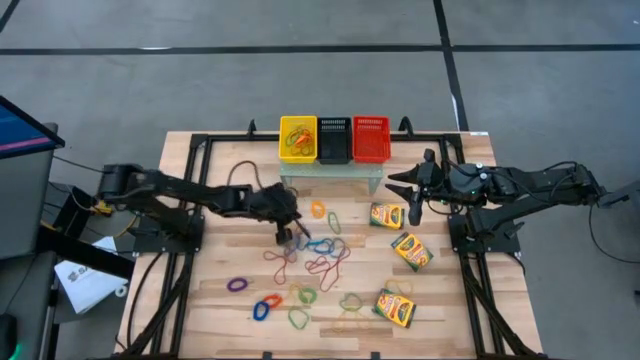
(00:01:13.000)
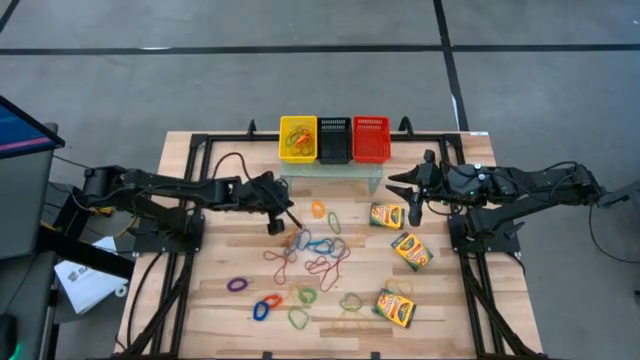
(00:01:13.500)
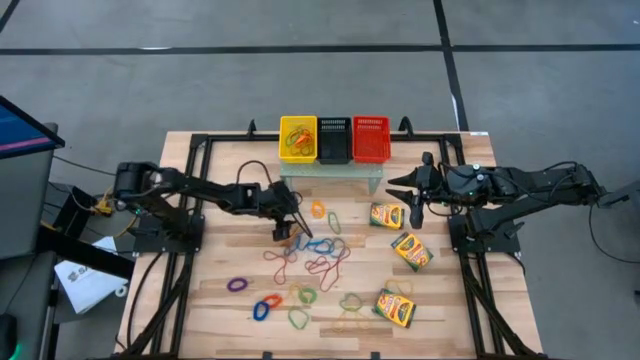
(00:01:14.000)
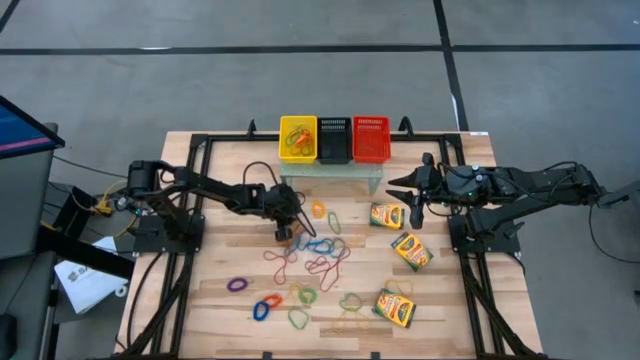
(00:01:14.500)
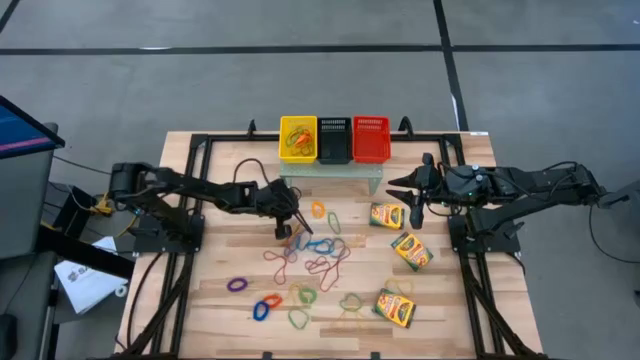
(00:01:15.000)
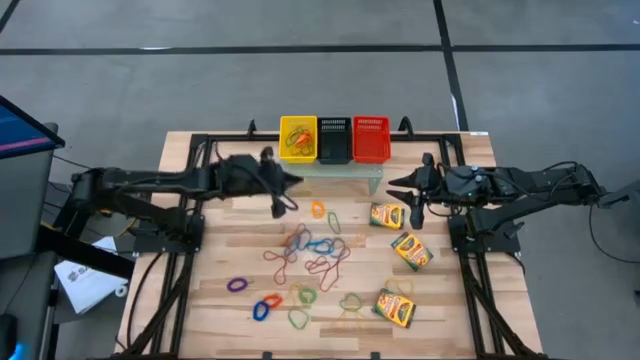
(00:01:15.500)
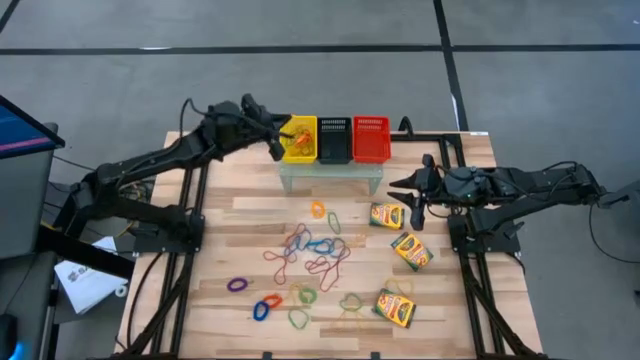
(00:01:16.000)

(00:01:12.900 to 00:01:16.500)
Task: Pick & Place Office Desk Supplies
Put the big yellow rubber band into the yellow bin on the shelf

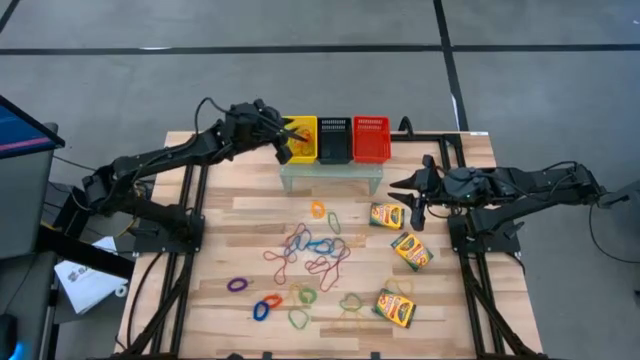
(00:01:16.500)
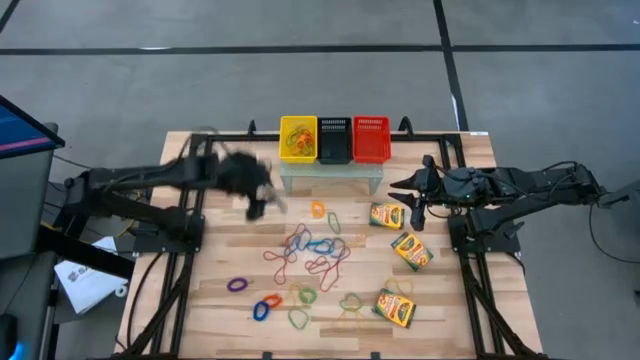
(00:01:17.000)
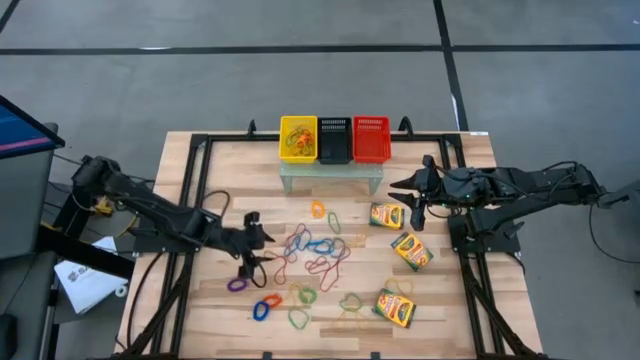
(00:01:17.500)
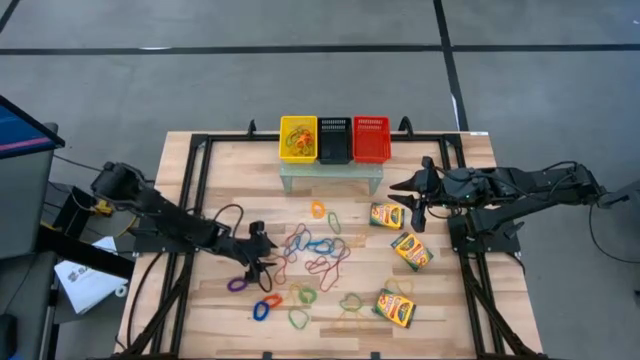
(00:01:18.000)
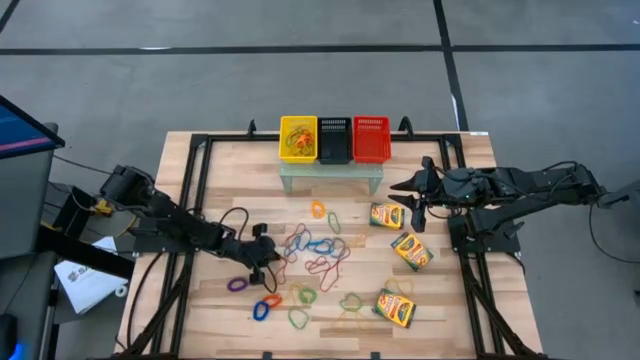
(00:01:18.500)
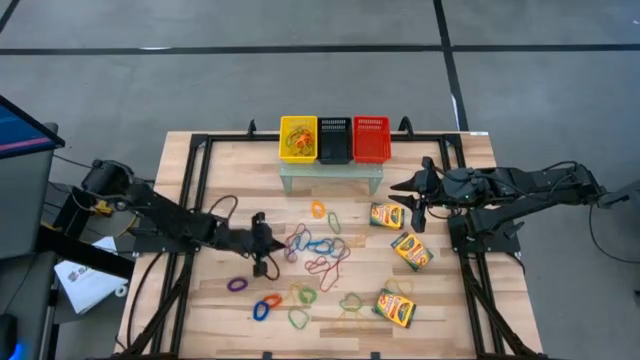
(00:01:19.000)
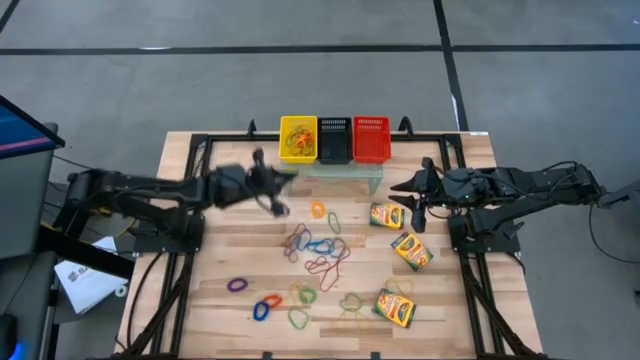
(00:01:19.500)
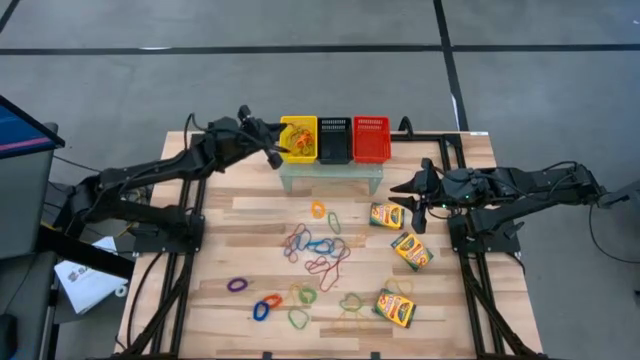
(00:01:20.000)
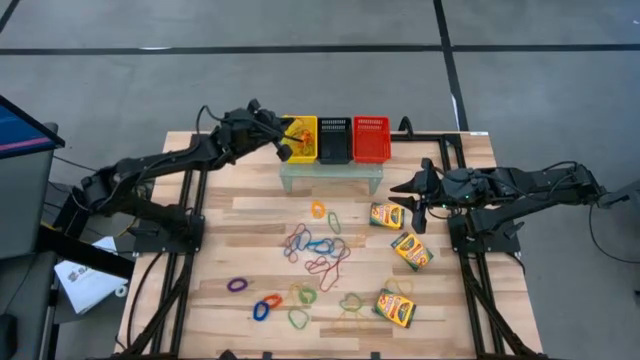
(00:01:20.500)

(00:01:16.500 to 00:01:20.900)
Put the big red rubber band into the yellow bin on the shelf

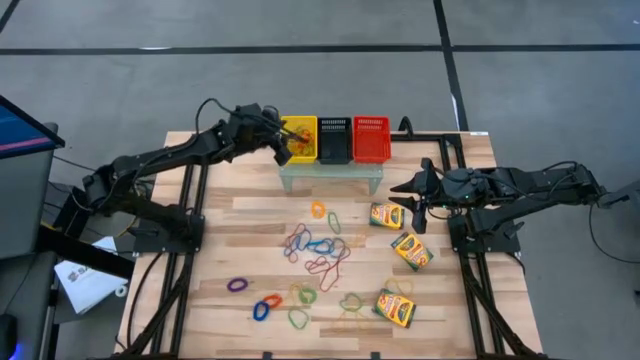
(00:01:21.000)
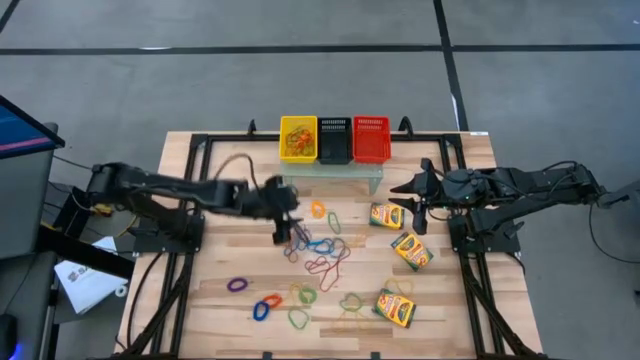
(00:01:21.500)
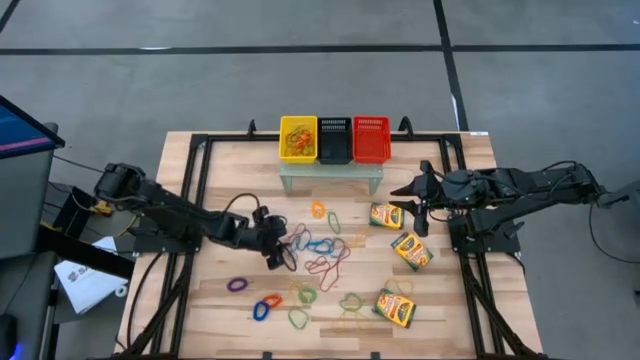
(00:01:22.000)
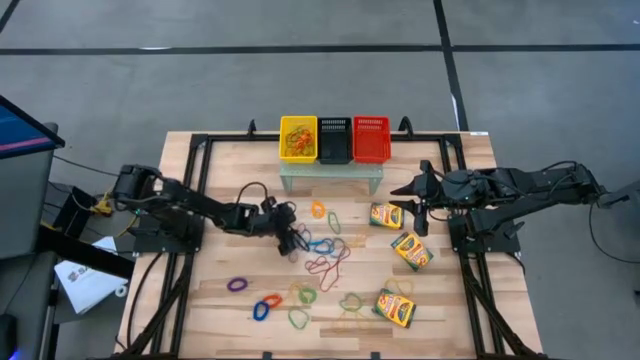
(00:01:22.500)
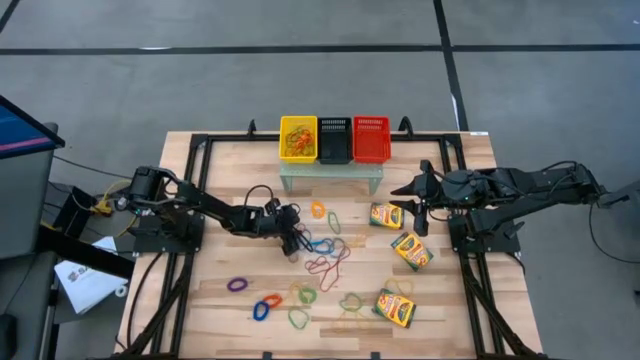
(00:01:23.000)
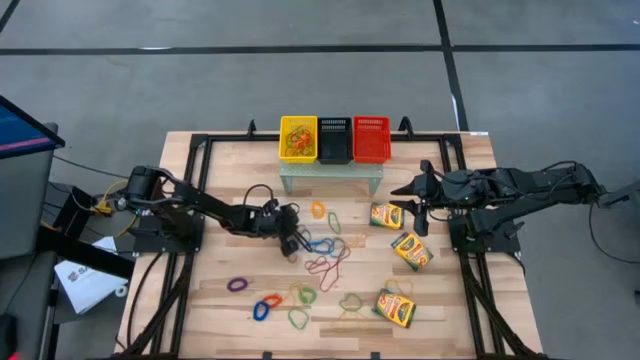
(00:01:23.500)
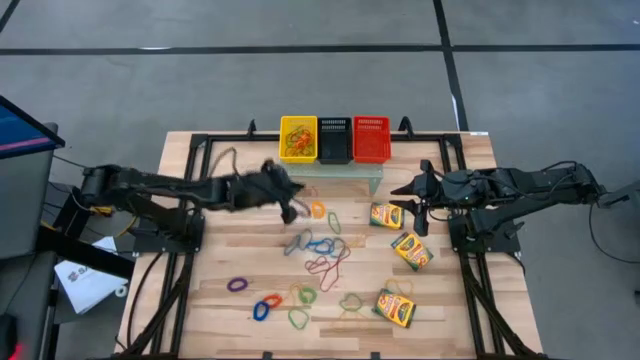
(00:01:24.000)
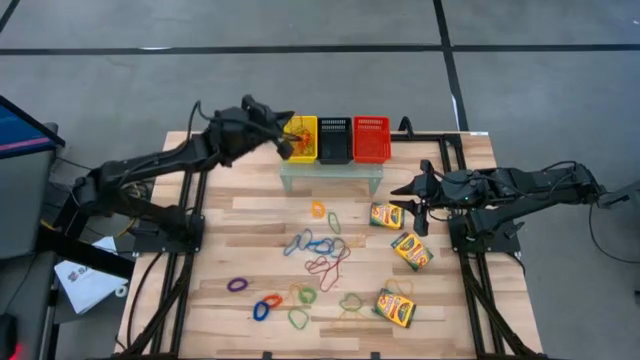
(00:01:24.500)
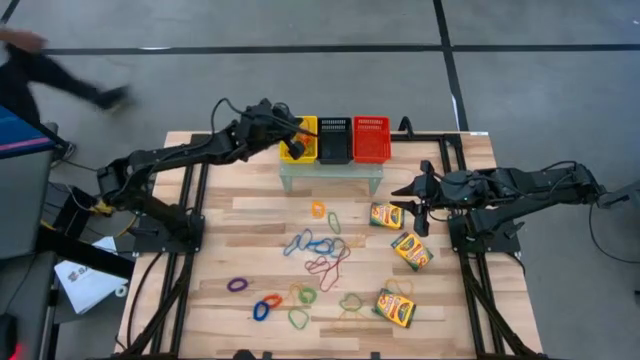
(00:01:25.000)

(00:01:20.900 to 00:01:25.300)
Put the top left big red rubber band into the yellow bin on the shelf

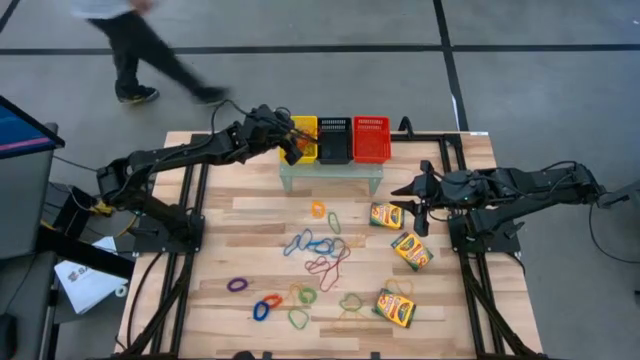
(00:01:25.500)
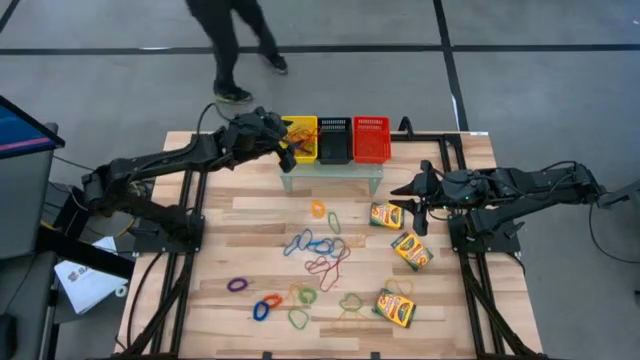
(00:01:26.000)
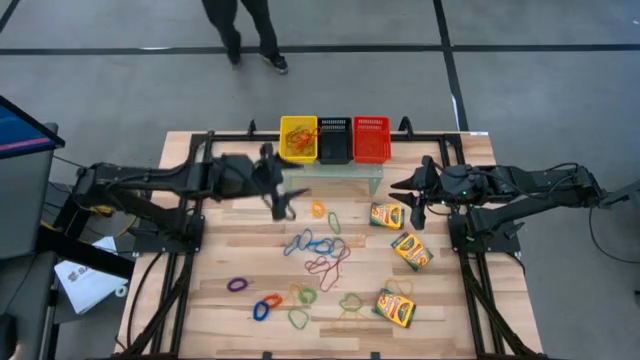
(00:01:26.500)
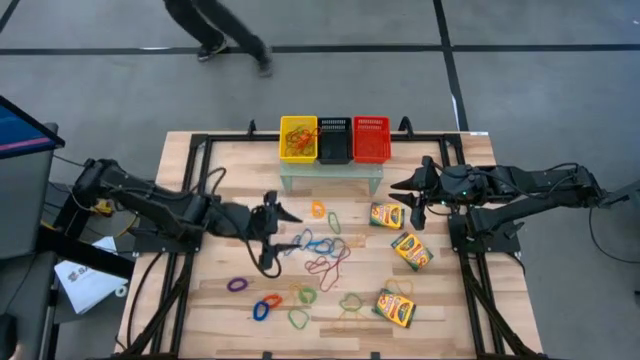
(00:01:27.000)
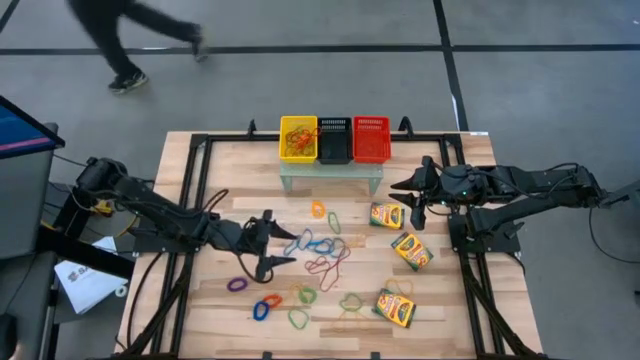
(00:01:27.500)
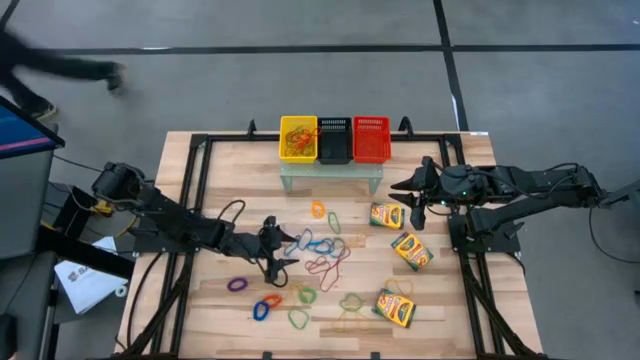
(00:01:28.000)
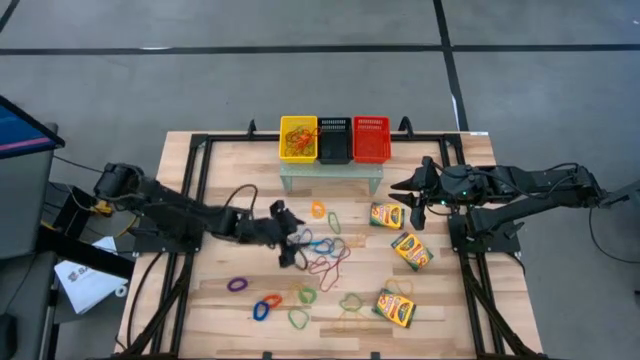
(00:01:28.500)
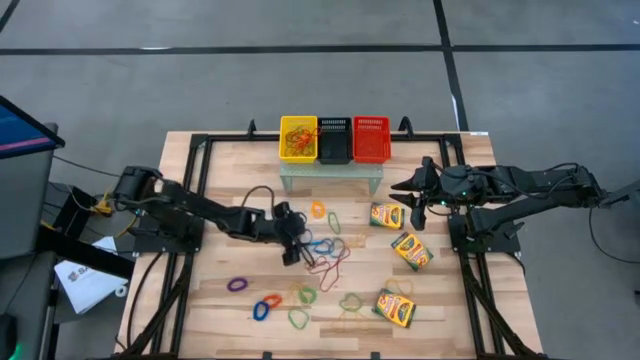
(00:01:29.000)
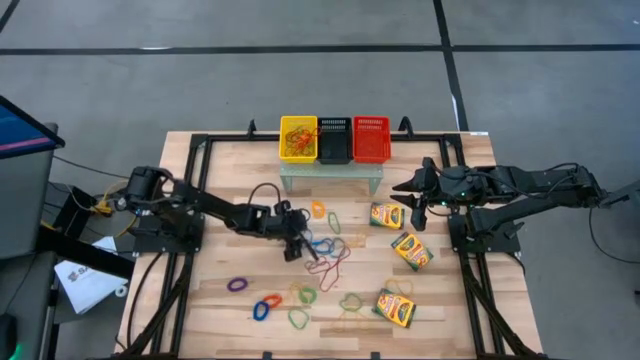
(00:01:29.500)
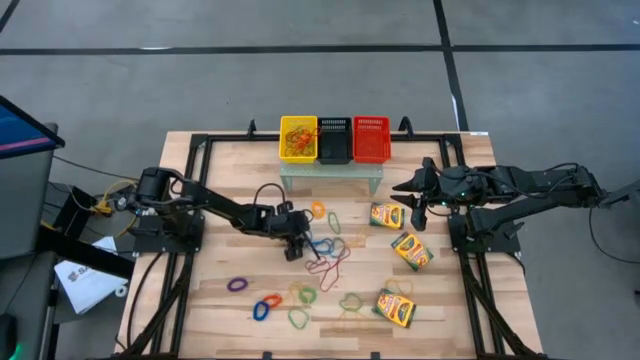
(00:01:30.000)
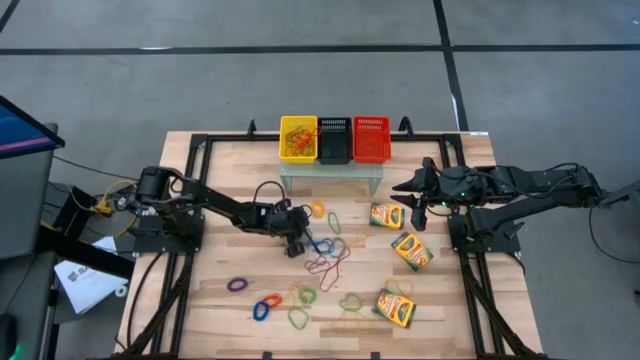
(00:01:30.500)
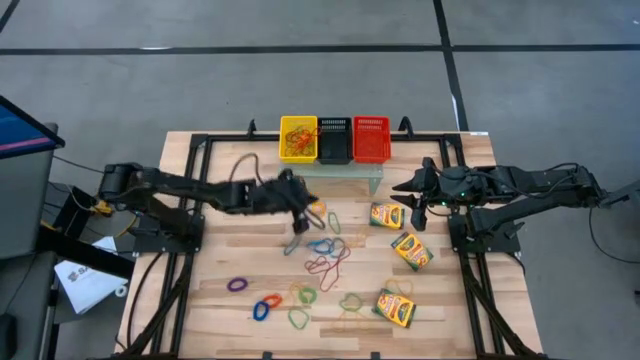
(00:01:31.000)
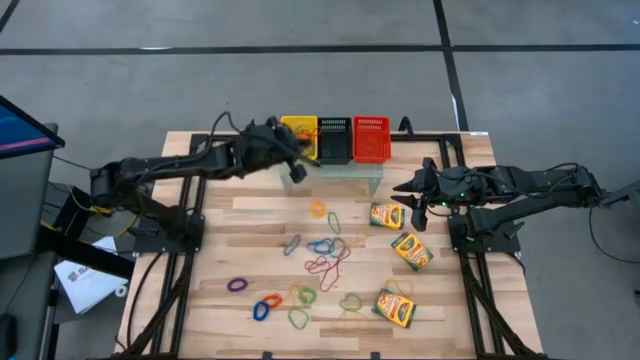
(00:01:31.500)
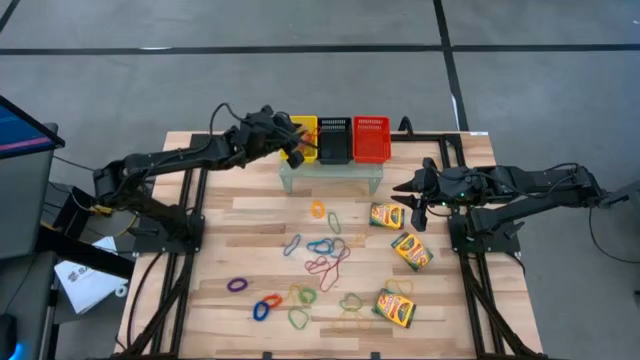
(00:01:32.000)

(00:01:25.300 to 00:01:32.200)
Put the small blue rubber band into the yellow bin on the shelf

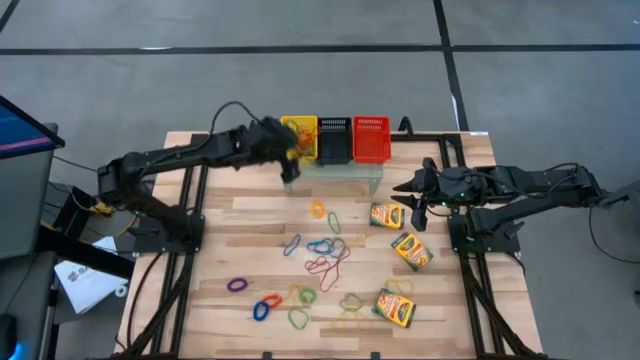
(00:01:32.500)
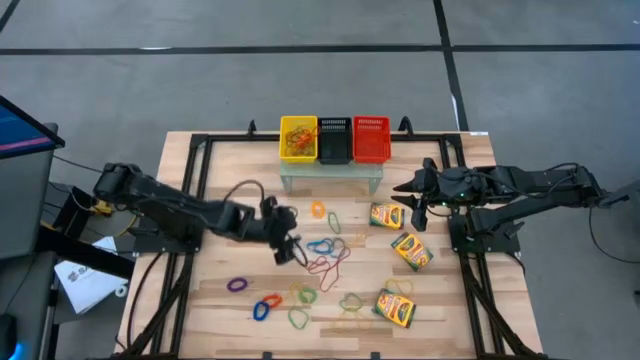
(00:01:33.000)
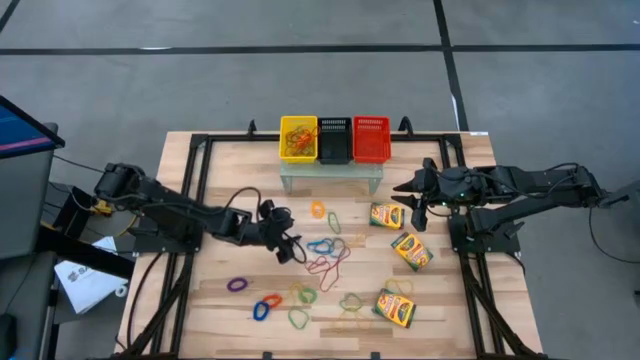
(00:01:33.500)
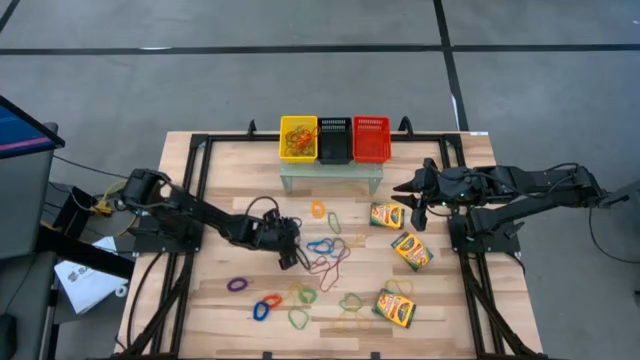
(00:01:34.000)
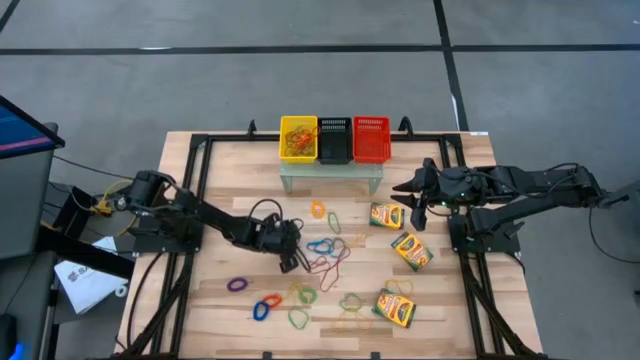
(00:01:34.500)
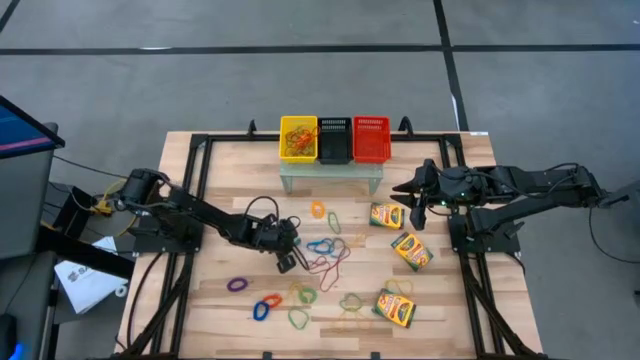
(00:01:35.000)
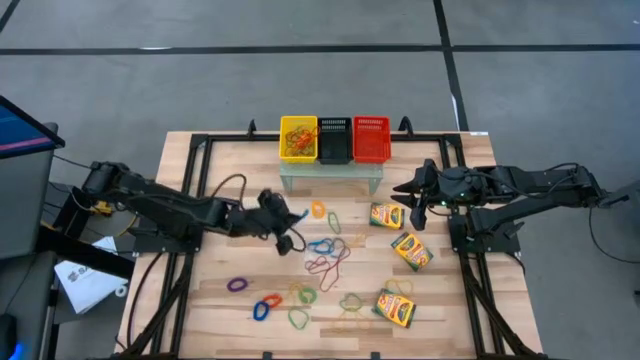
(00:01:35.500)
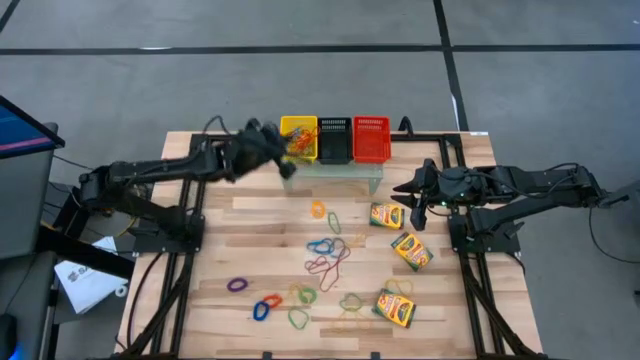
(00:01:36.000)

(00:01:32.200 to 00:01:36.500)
Put the small blue rubber band into the yellow bin on the shelf
